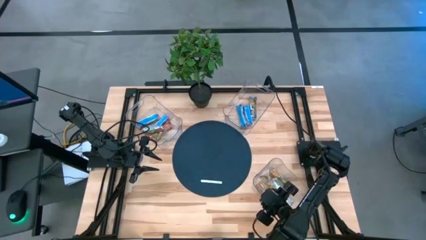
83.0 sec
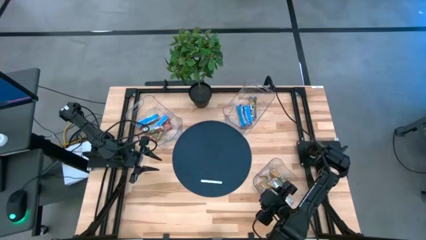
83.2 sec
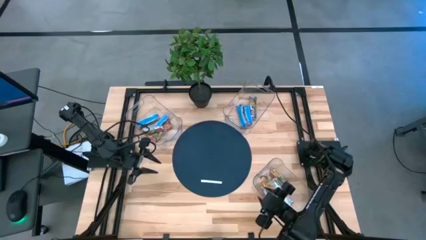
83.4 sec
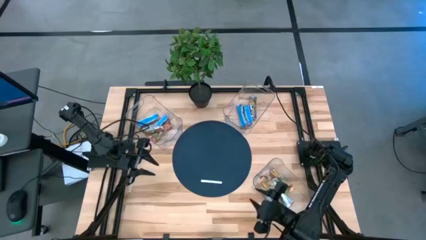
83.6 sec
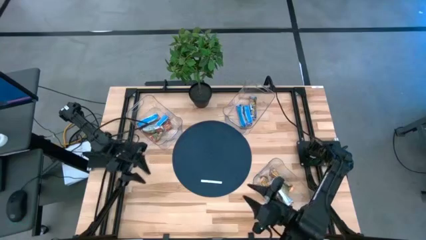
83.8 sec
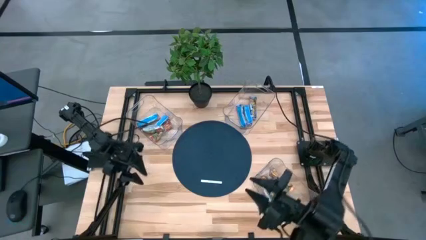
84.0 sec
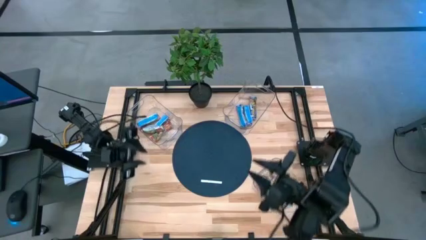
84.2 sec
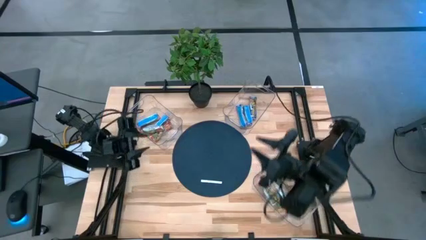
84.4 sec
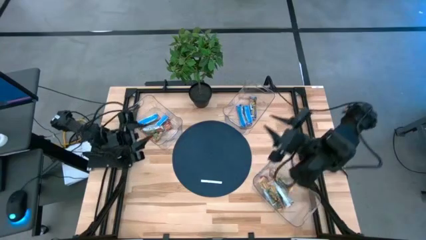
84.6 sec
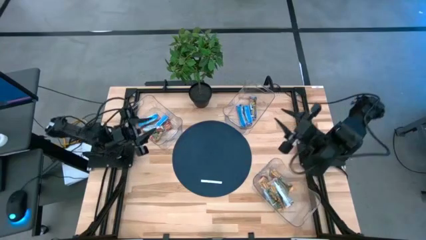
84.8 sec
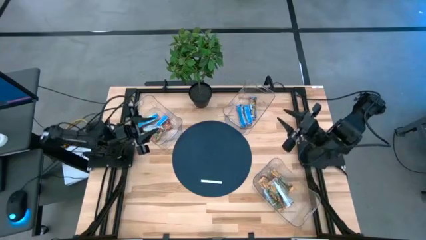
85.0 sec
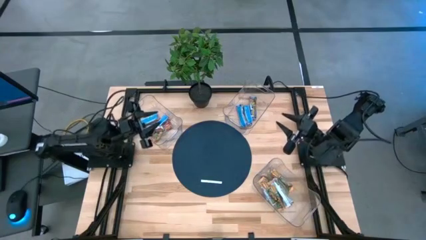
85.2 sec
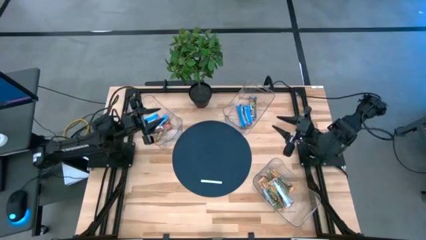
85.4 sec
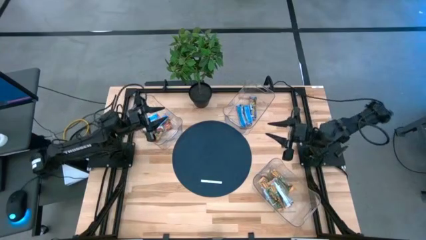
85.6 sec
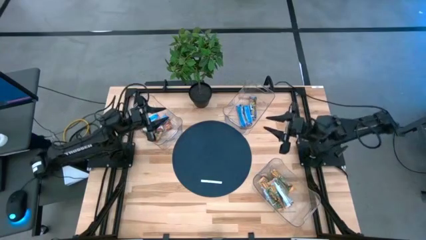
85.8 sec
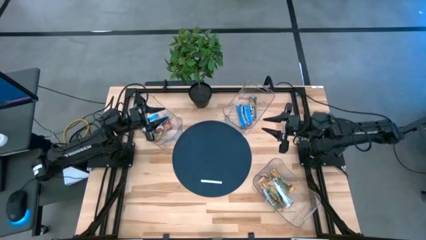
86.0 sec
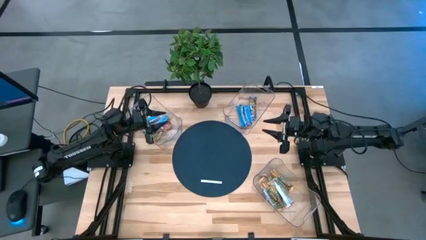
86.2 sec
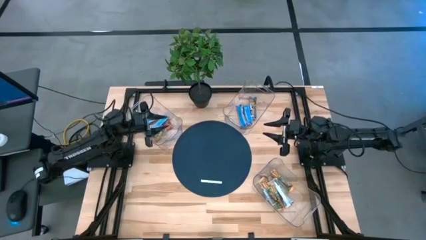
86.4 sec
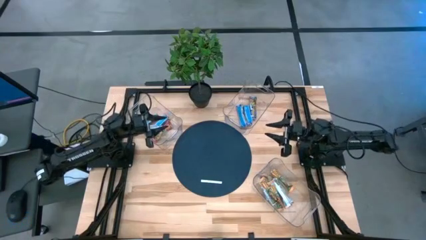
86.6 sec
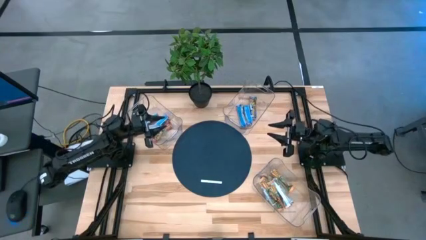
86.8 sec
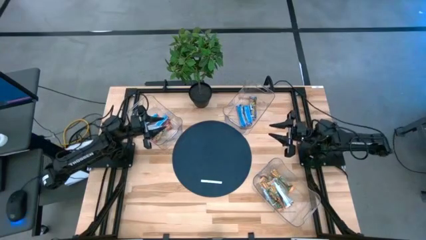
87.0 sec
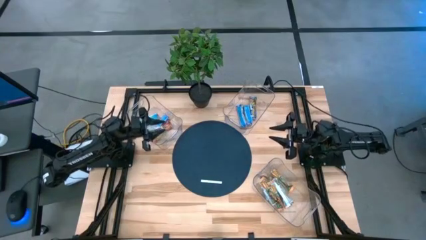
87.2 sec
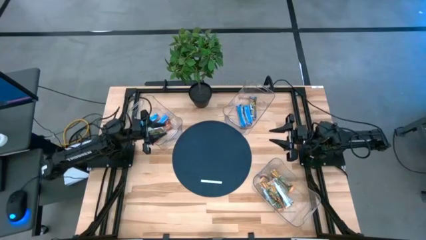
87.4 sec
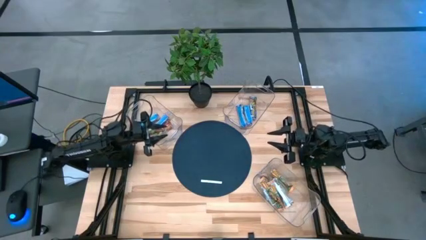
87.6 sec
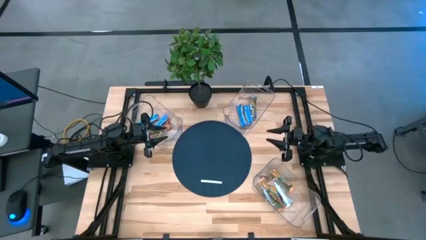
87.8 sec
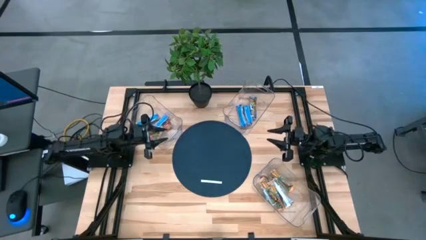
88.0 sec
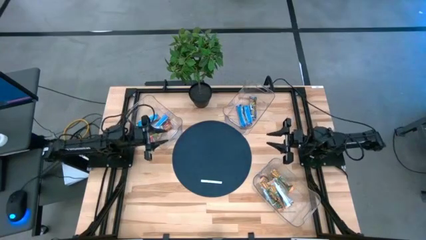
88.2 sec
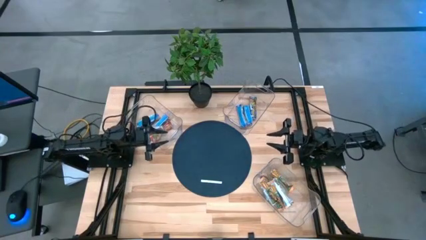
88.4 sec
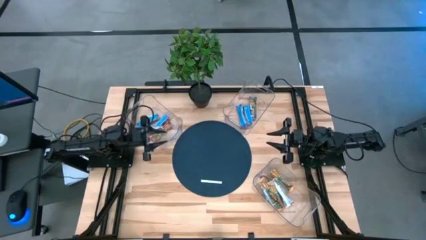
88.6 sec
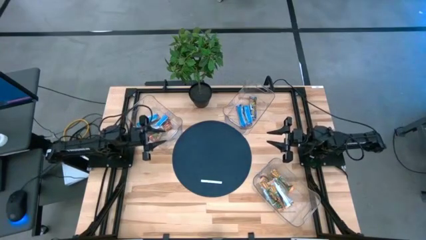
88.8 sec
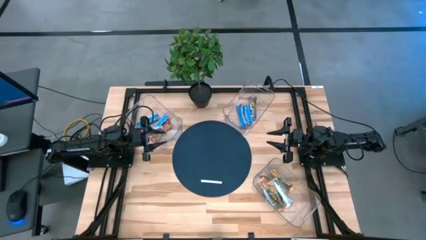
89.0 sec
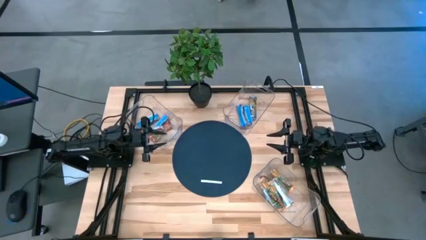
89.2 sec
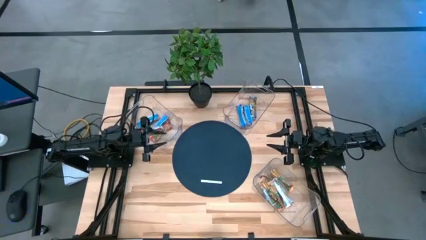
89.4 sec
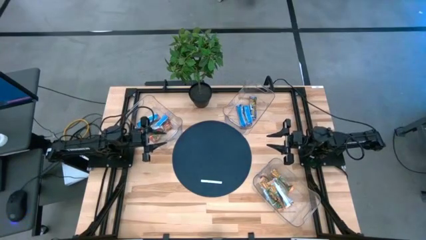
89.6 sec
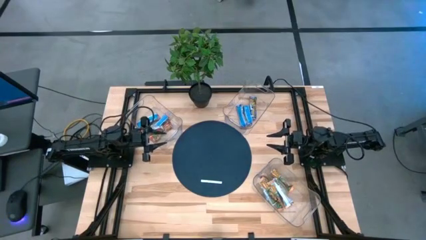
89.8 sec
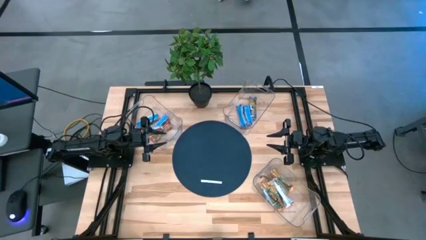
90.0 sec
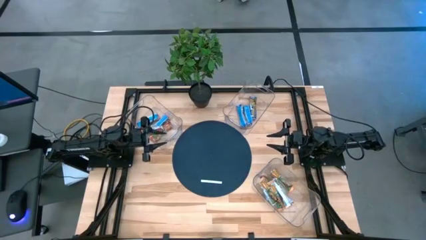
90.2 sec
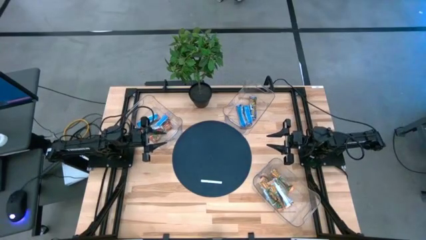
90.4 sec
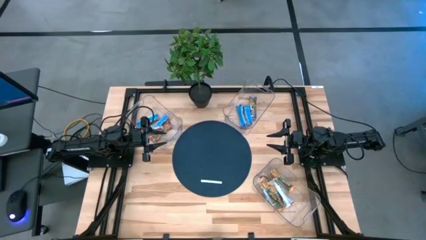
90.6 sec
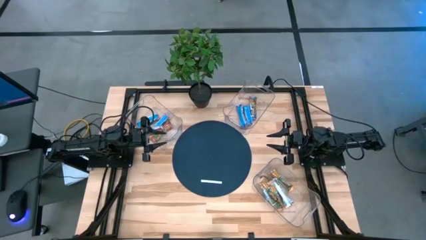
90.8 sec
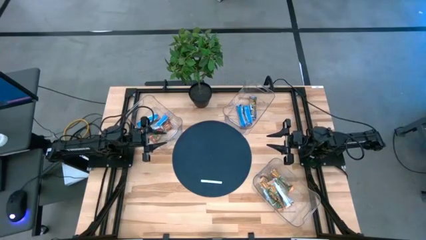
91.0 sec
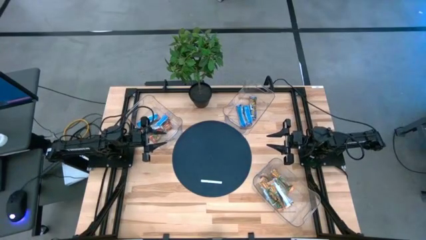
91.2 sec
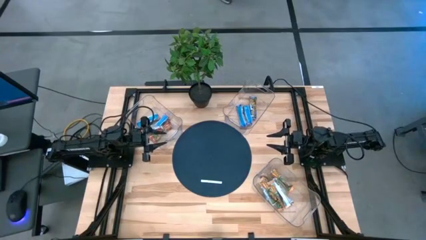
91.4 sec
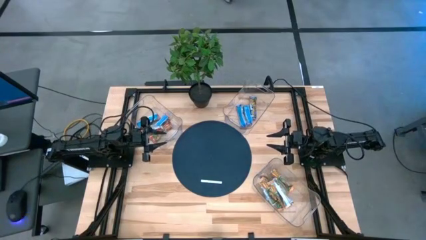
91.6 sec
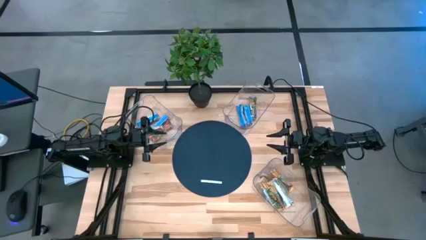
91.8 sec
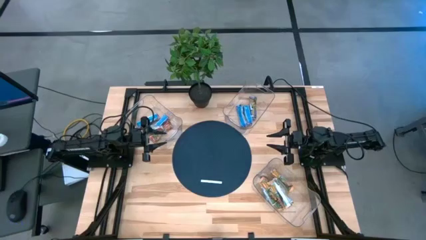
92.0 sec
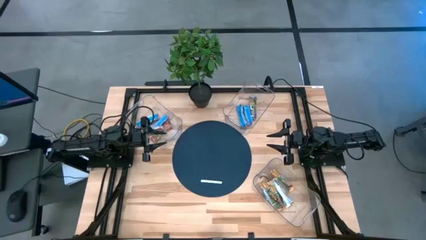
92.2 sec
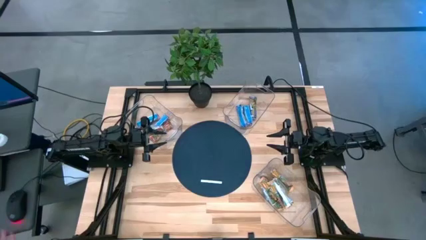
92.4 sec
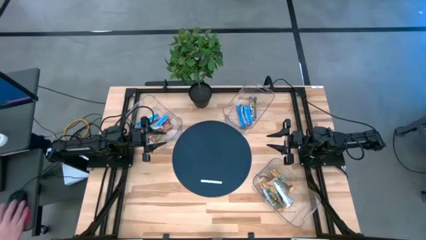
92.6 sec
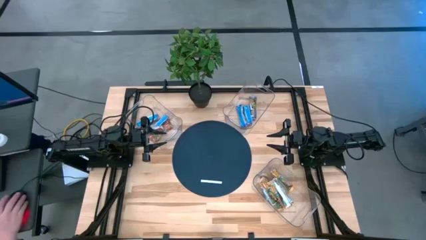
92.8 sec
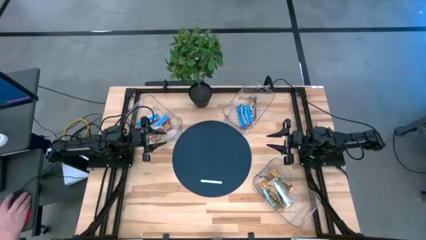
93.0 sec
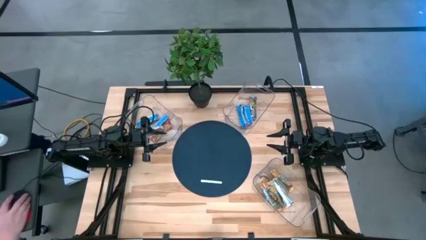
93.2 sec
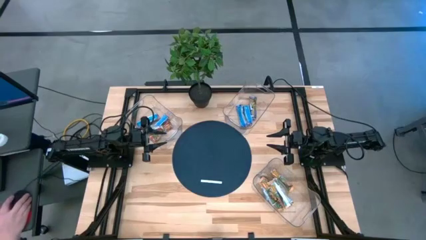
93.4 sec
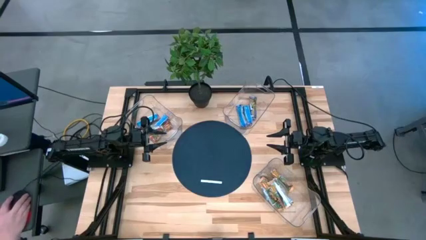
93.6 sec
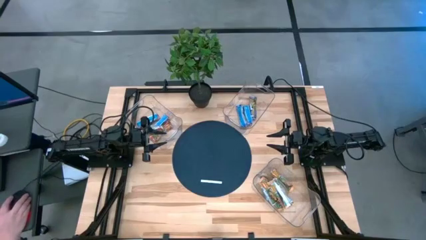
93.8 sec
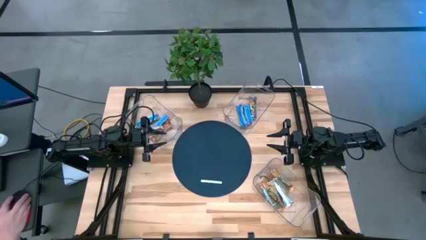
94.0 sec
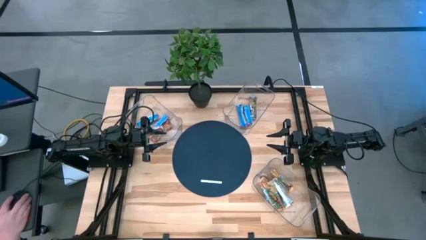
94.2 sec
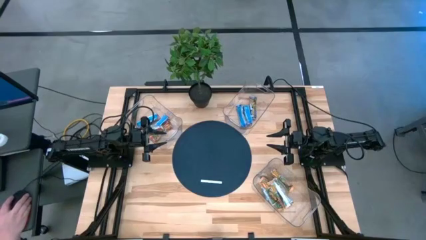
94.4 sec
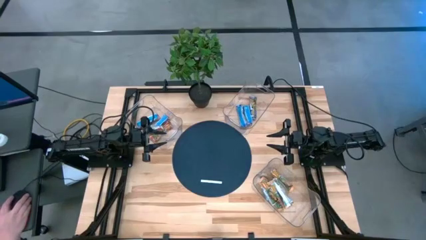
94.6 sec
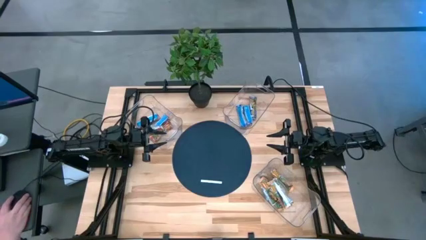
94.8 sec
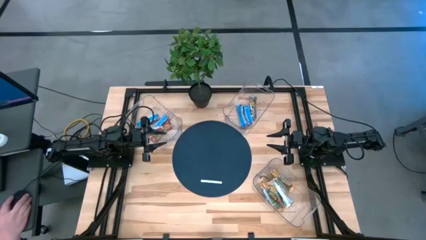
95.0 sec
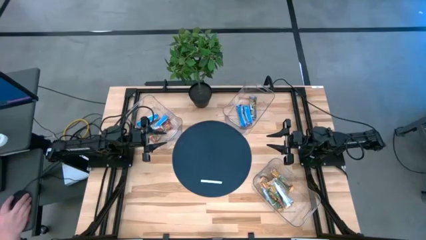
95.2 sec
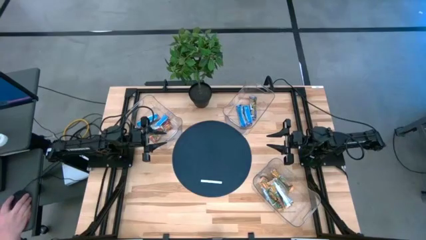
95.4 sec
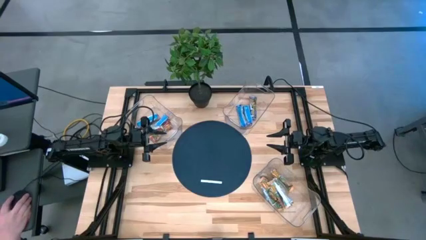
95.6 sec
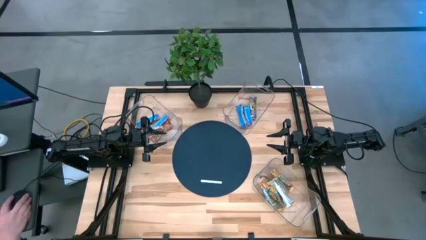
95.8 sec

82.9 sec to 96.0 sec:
Task: Pick and place Granola Bars by type
Return to Home Position

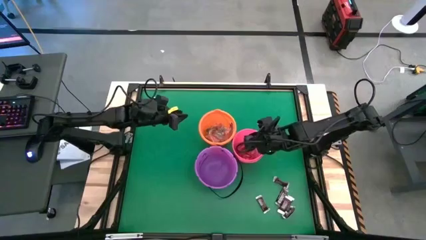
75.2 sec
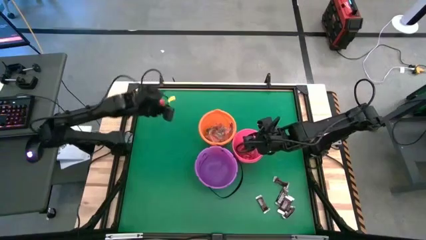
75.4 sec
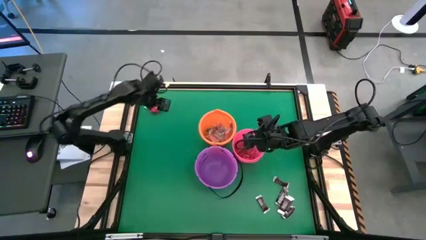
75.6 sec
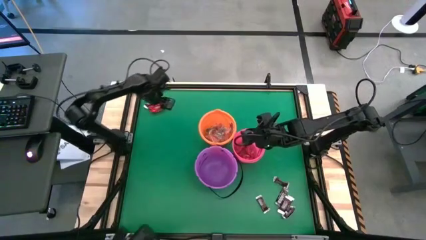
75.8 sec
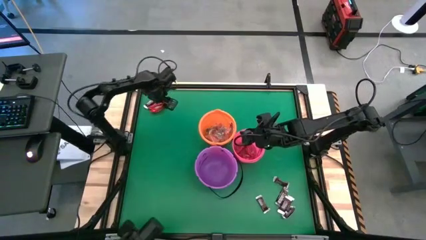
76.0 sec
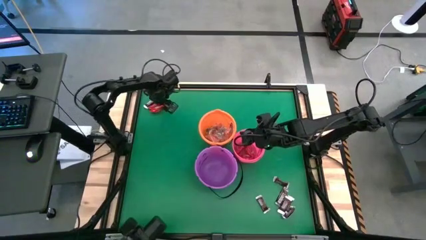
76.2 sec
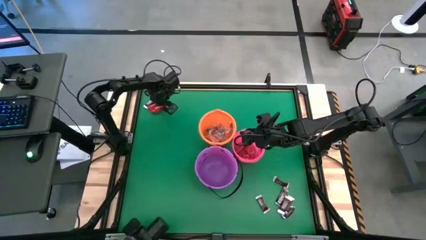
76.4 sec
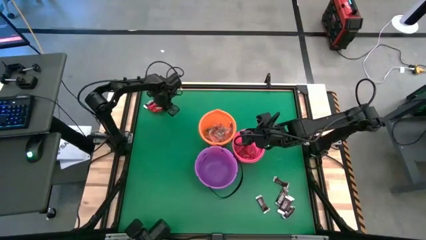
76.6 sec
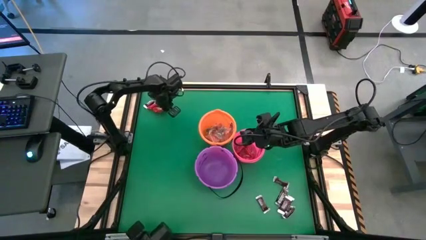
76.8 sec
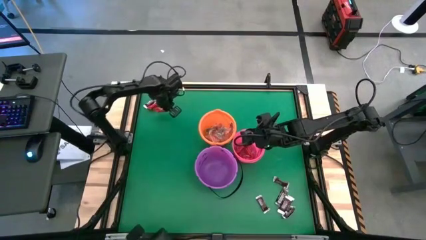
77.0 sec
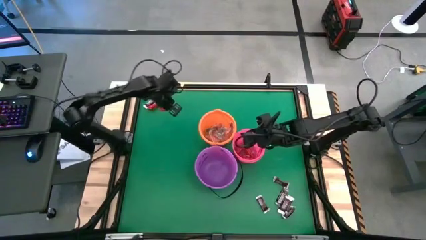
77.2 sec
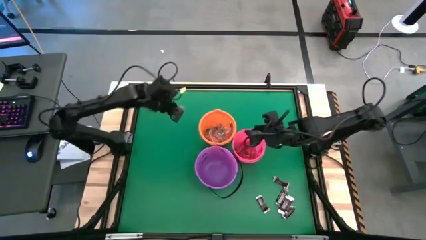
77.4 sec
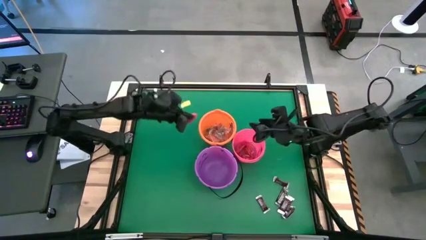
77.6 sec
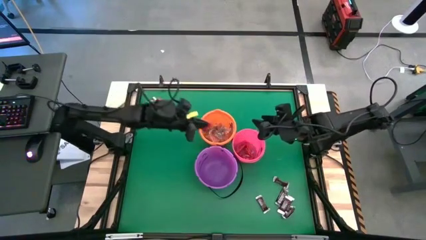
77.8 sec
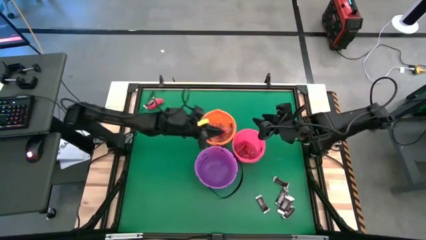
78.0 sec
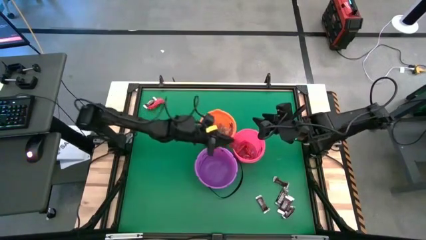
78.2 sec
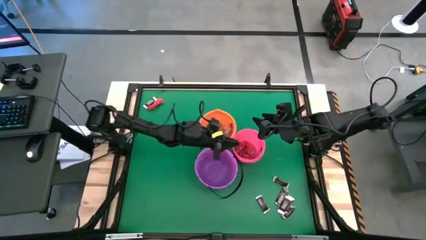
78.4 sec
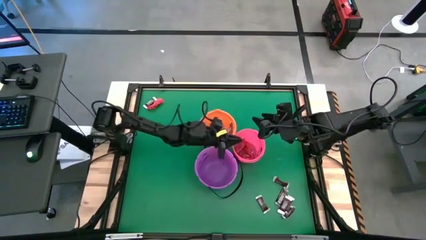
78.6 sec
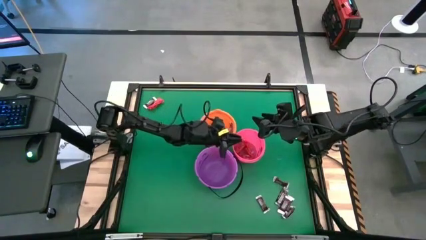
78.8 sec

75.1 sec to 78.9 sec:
Task: Sort candy by brand, put in halloween buckets
Put the red chocolate bar into the pink bucket
